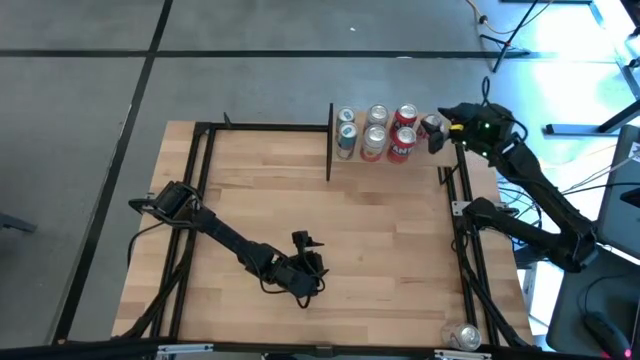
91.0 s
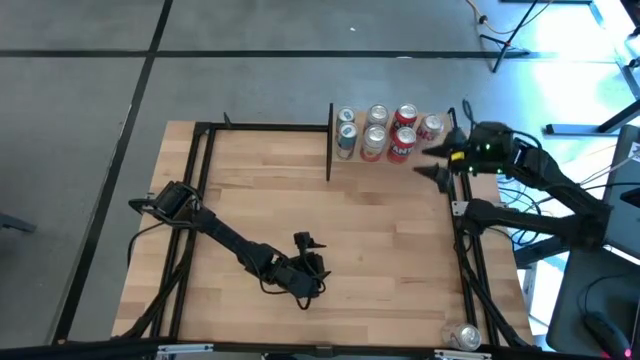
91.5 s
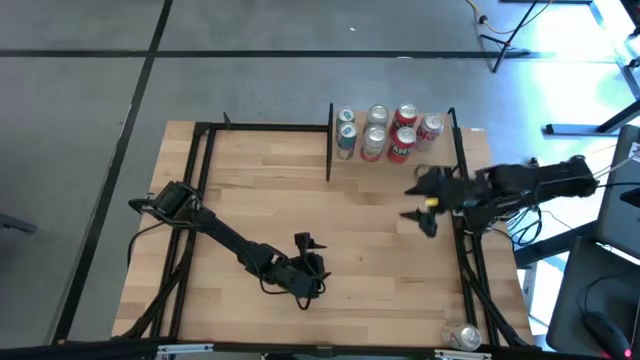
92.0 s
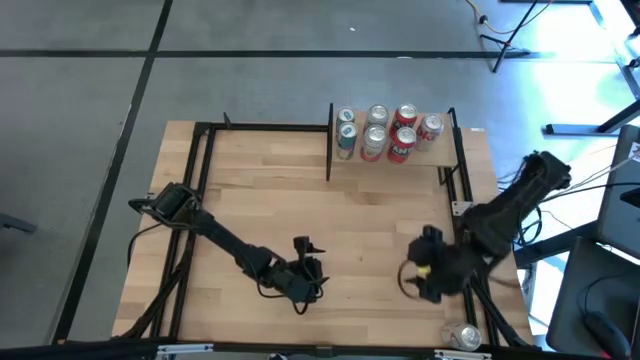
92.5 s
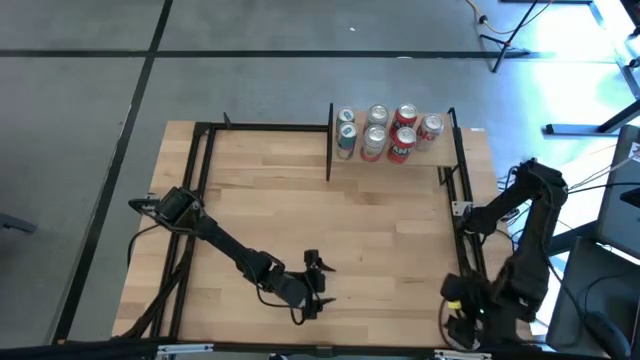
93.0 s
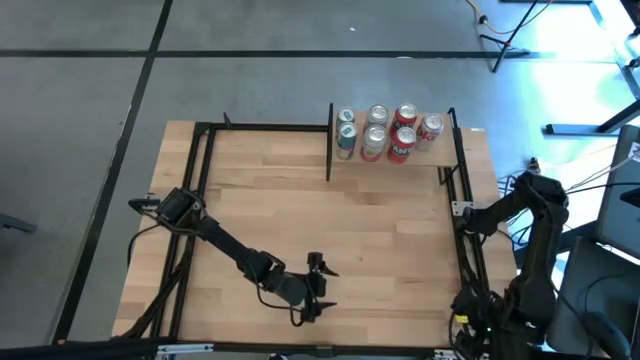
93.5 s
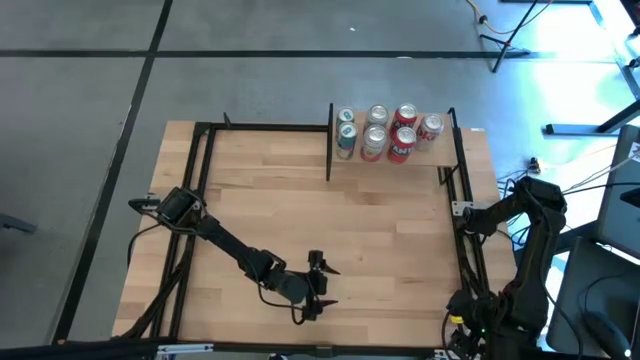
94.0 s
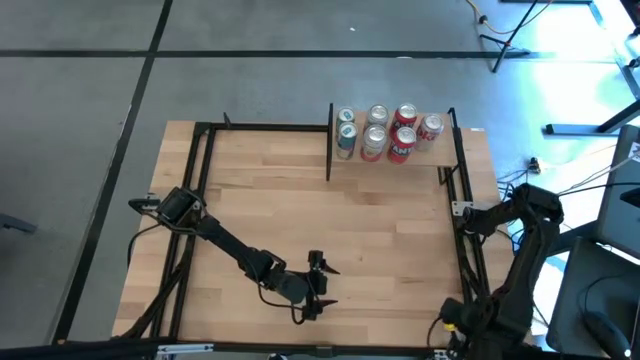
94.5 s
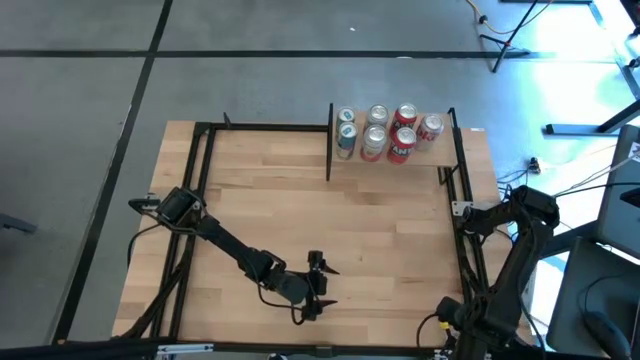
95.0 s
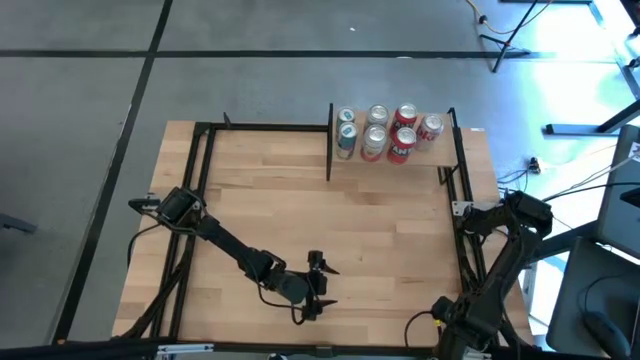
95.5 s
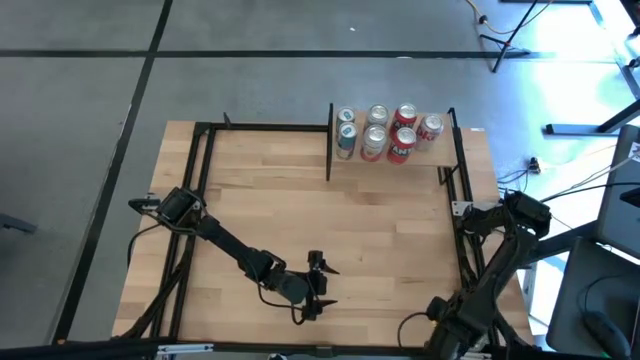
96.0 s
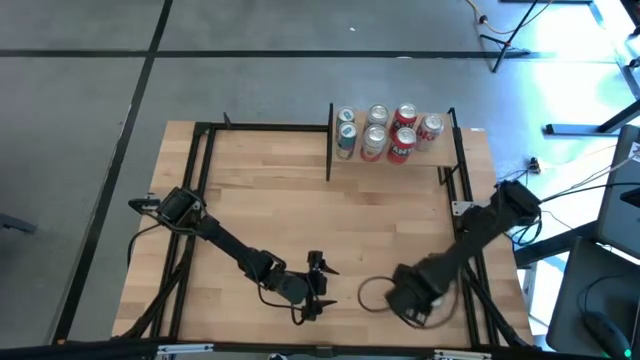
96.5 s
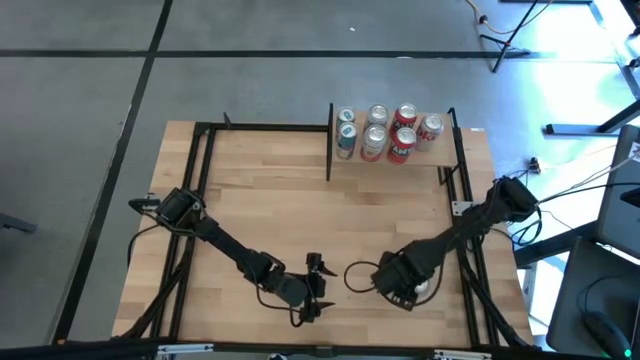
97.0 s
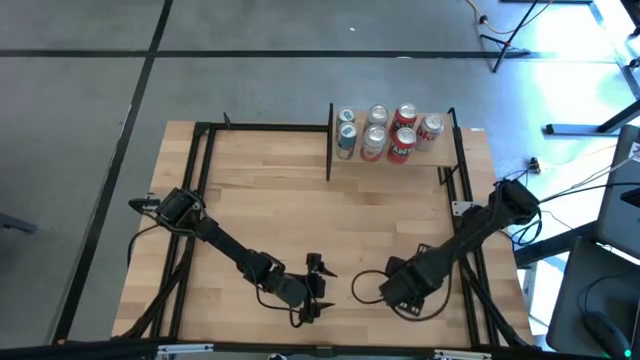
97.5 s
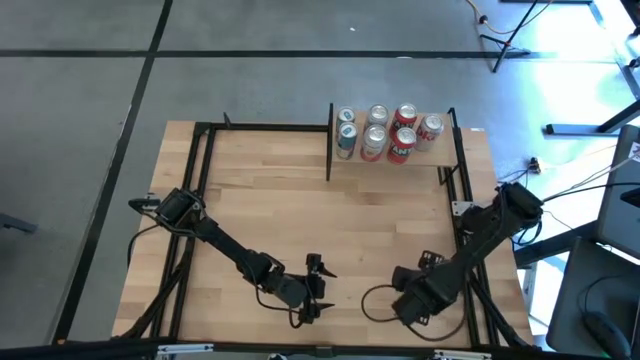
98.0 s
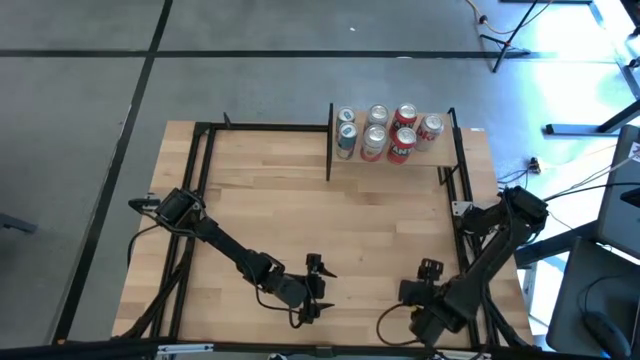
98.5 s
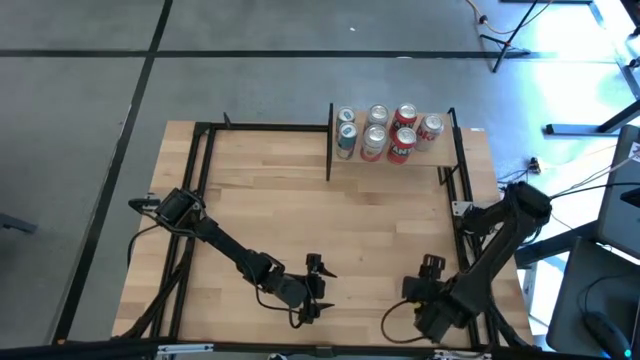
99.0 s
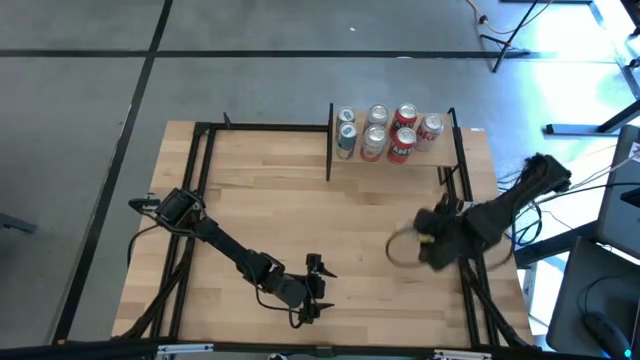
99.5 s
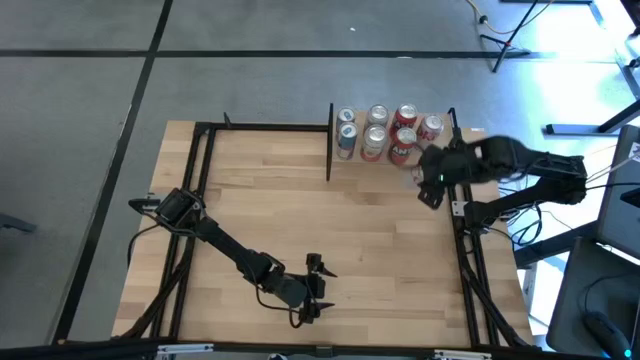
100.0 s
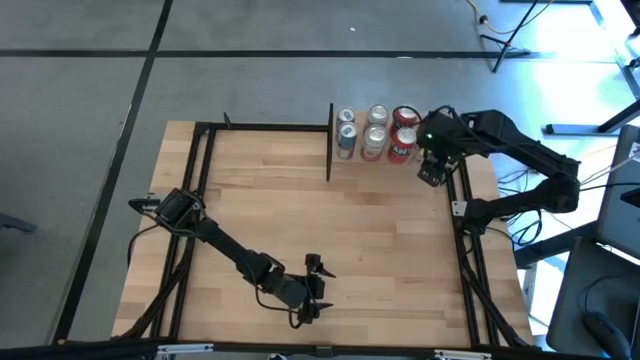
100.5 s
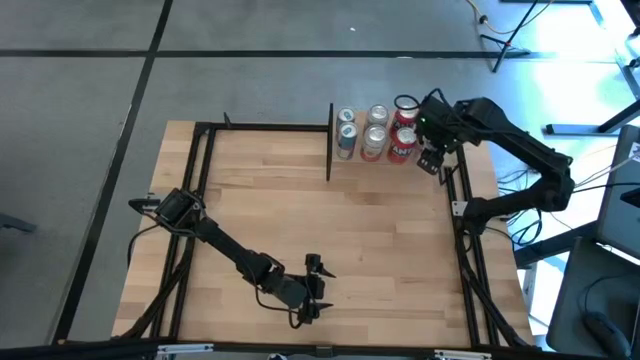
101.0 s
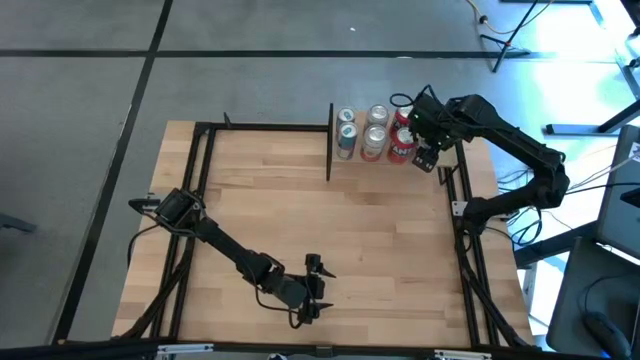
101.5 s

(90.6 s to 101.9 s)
Task: Place canned beverage on shelf
Put the red silver soda can and align with other red silver can on the shelf

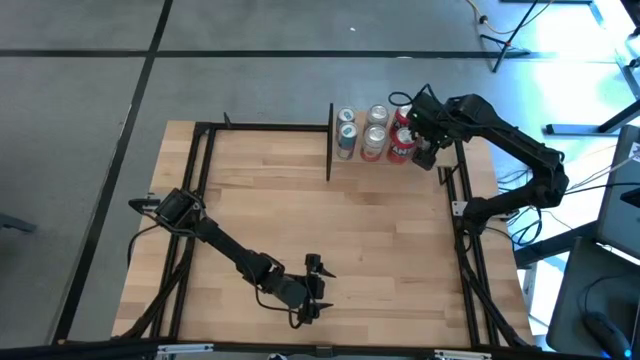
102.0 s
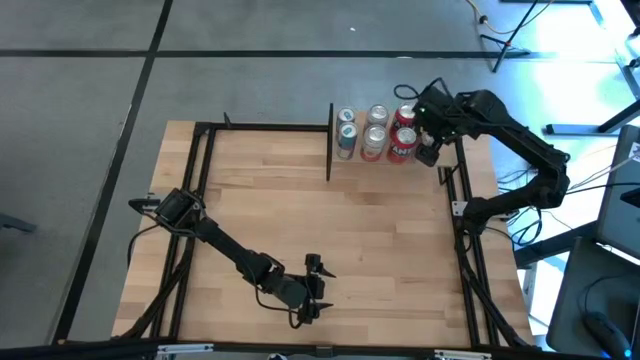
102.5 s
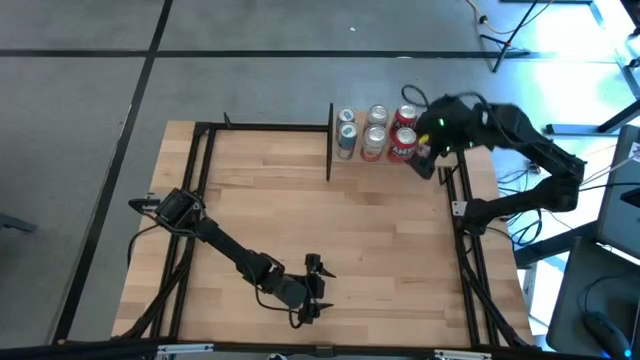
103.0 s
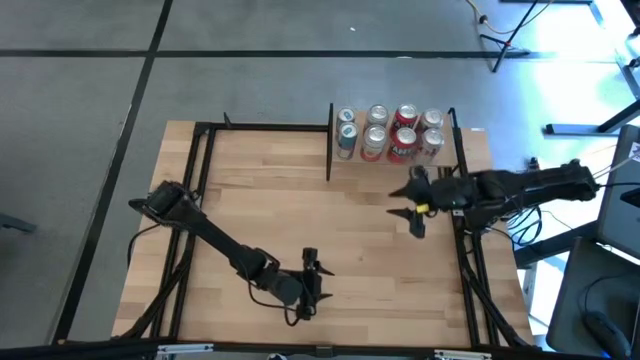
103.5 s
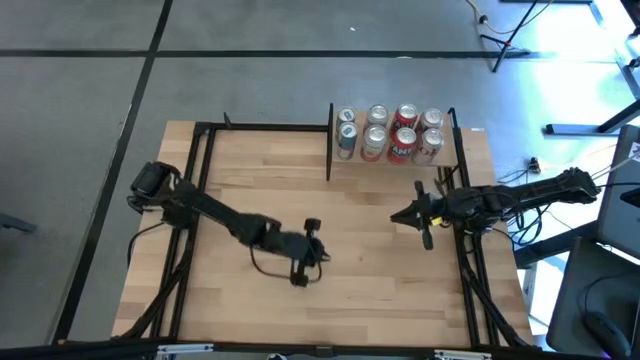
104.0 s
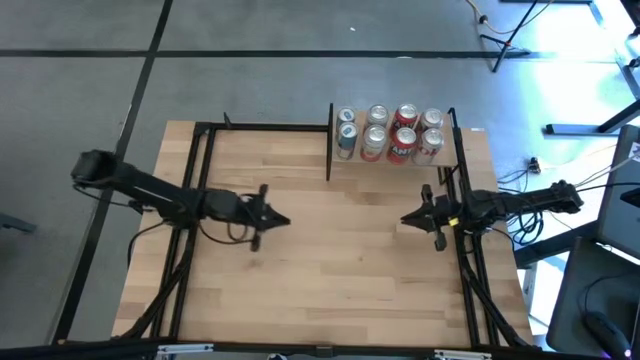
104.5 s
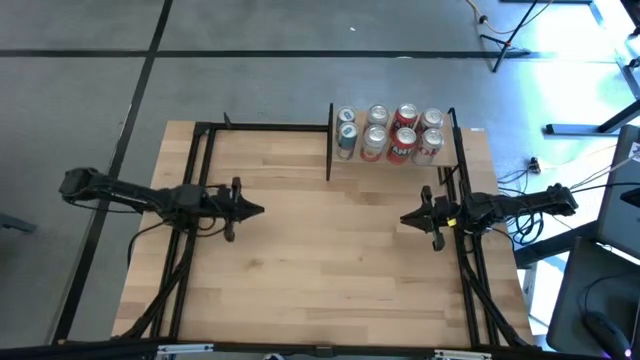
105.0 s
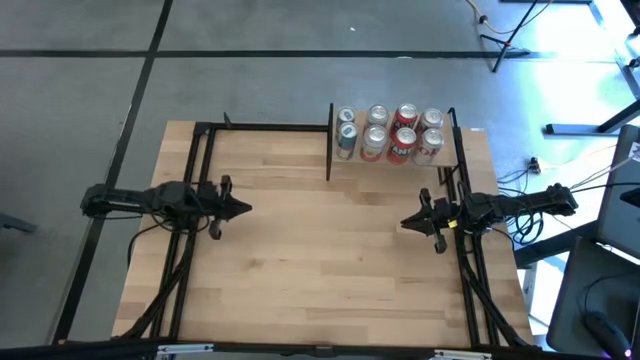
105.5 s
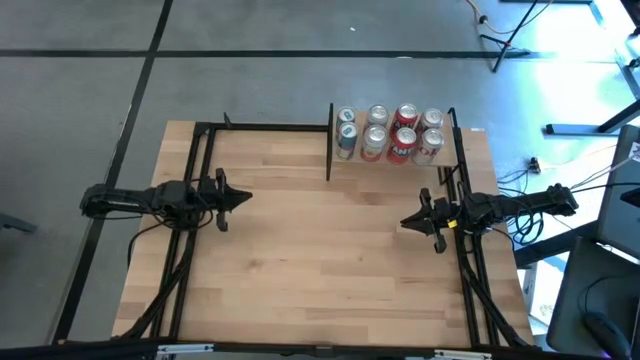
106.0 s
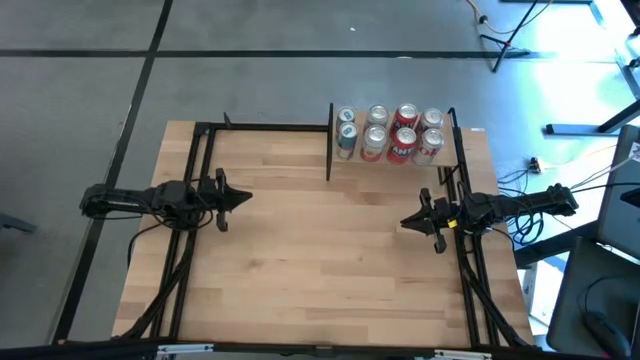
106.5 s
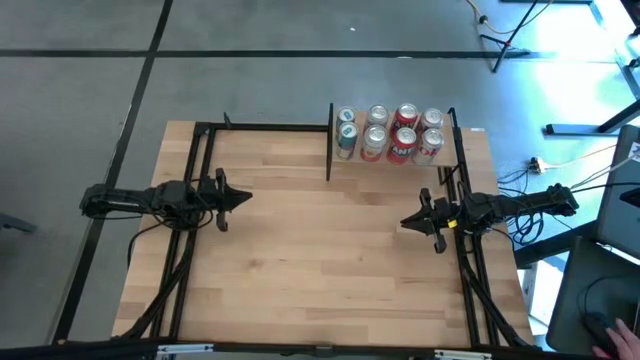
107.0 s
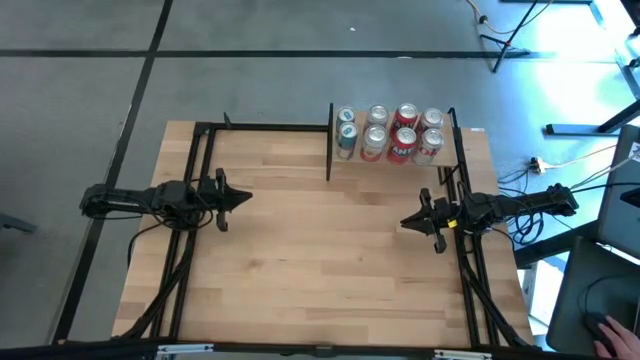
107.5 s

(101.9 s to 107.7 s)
Return to Home Position

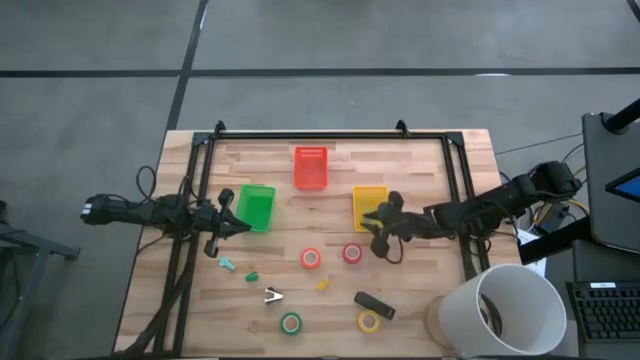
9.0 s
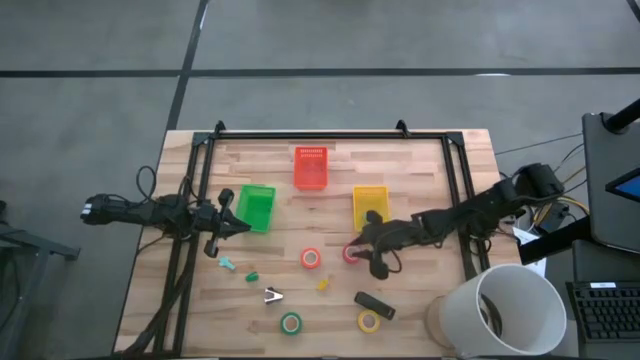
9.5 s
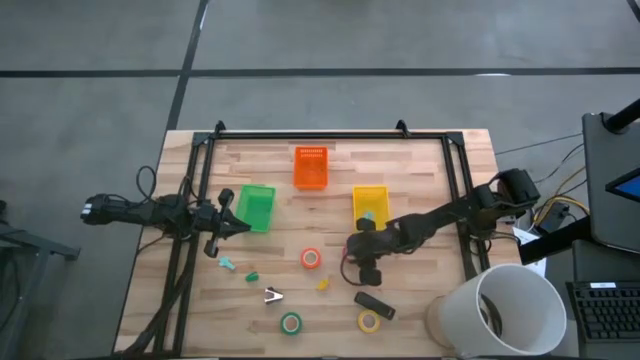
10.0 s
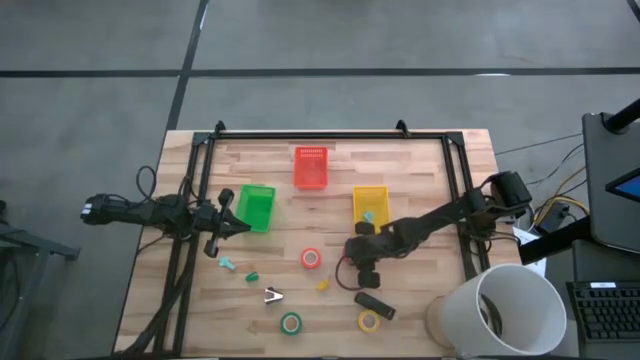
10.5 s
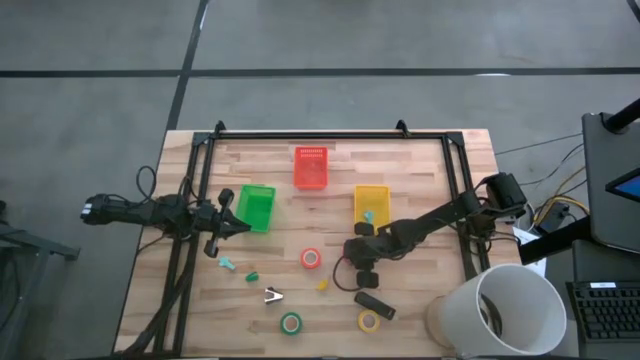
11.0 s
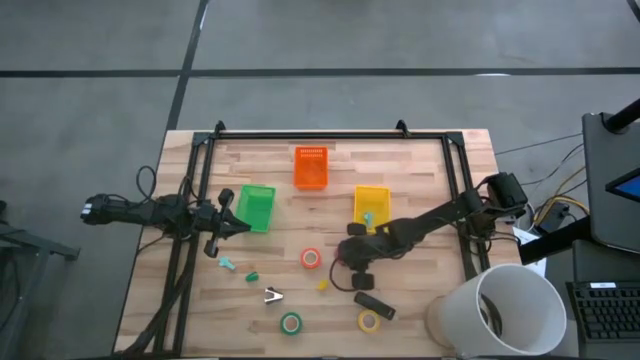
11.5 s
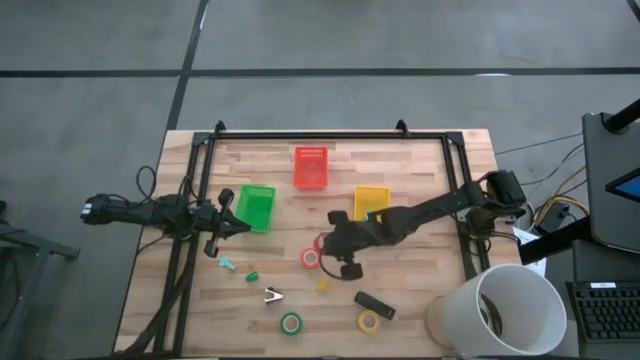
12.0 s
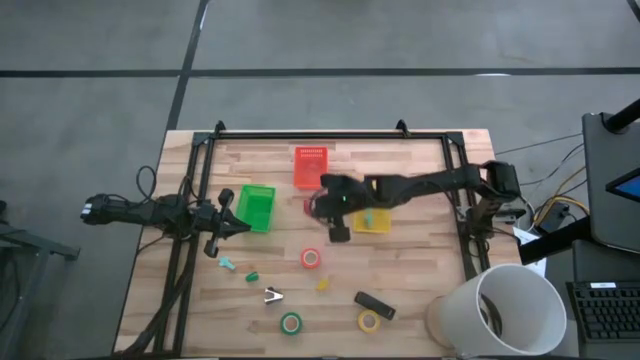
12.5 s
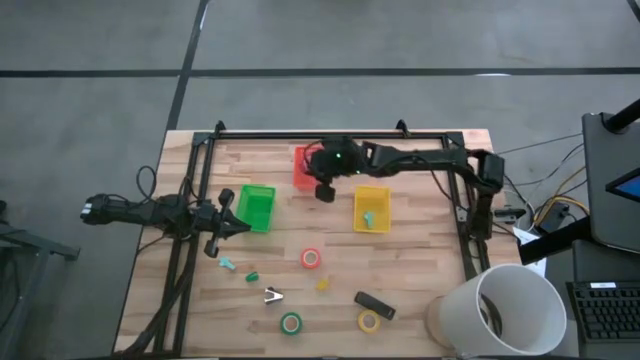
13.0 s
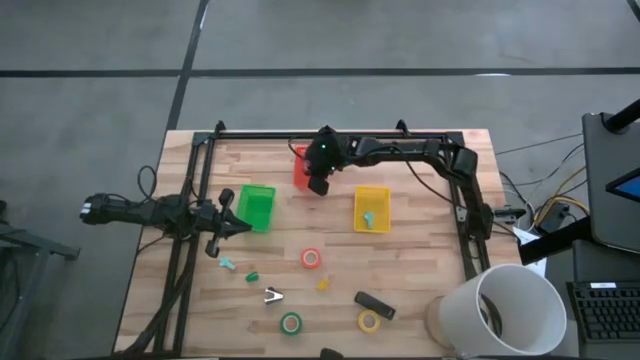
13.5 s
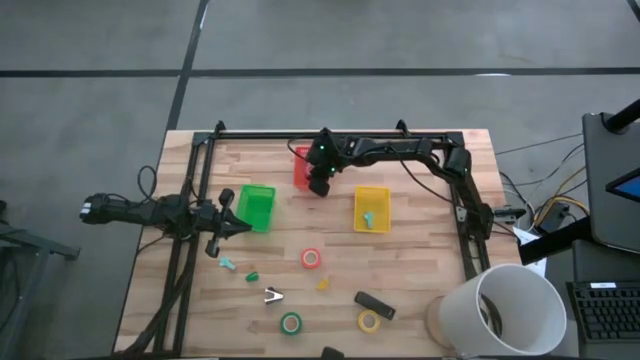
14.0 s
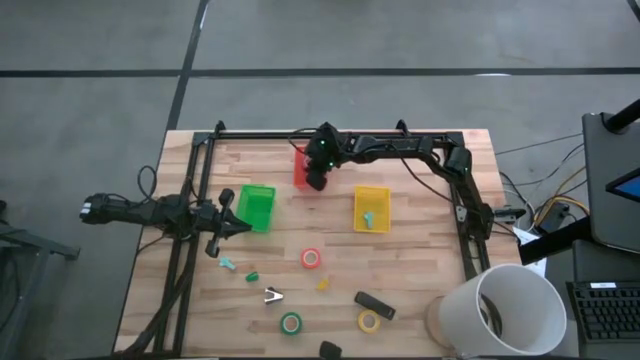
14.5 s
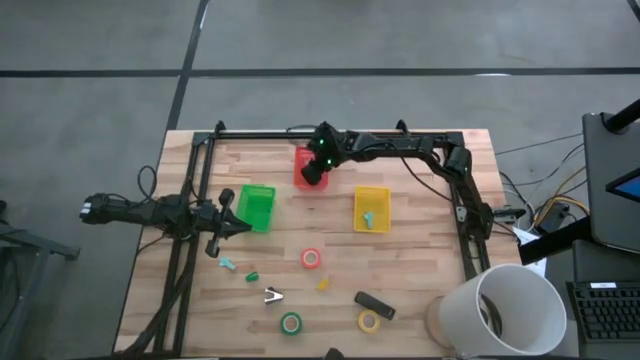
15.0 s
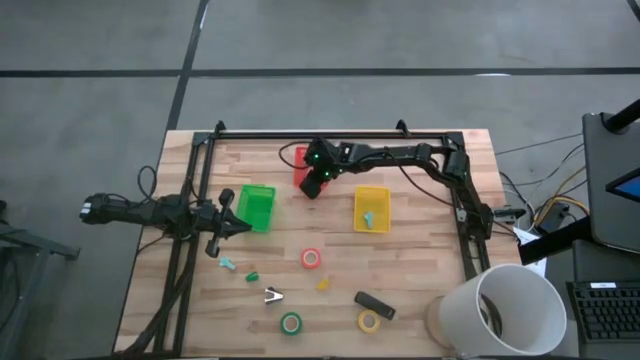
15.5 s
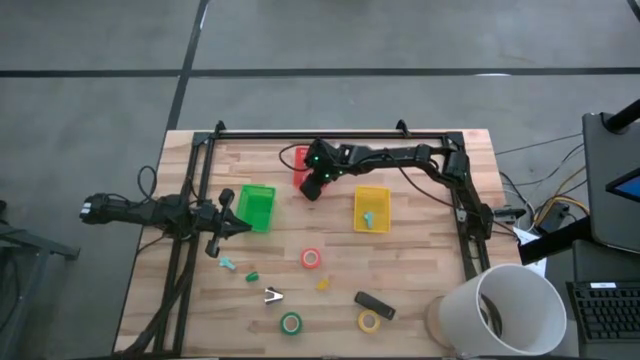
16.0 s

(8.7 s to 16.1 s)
Task: Pick and place Stapler, Stapler remover, tape
Put the red tape into the orange basket
